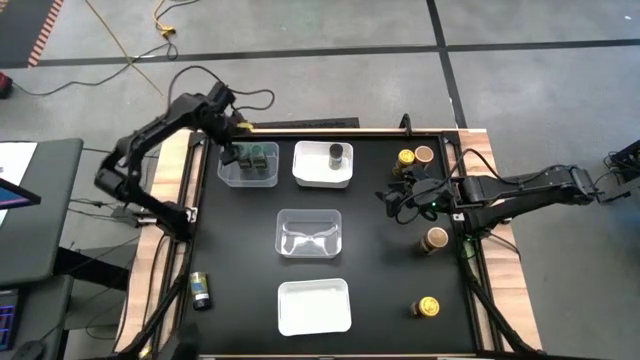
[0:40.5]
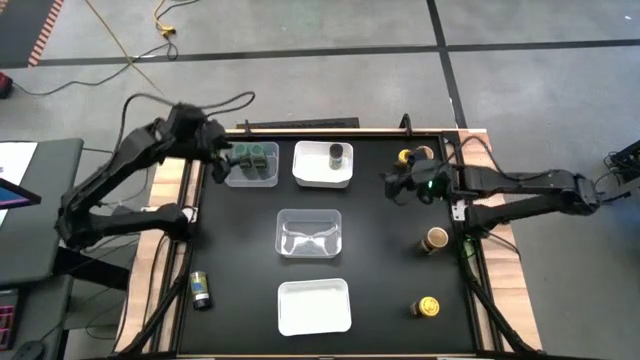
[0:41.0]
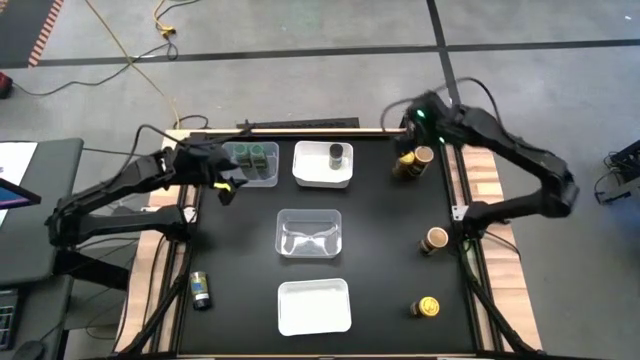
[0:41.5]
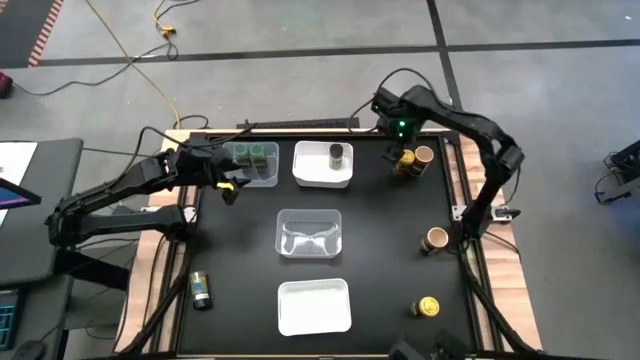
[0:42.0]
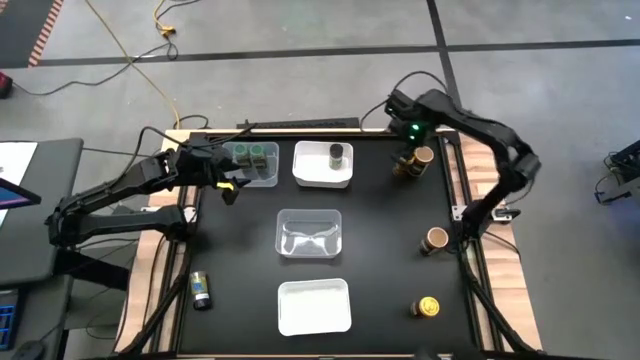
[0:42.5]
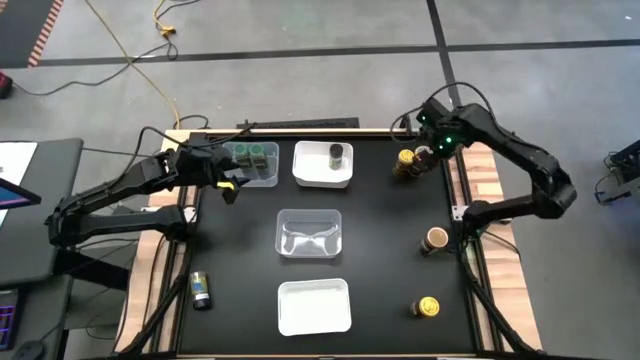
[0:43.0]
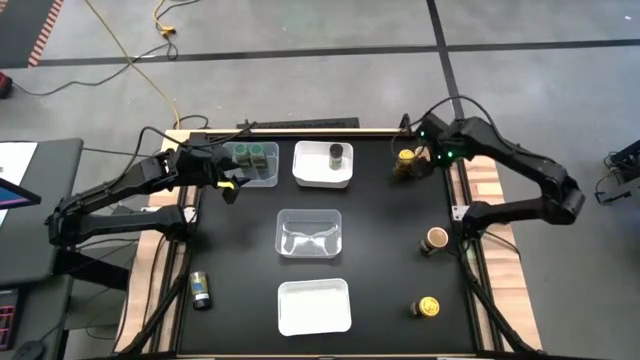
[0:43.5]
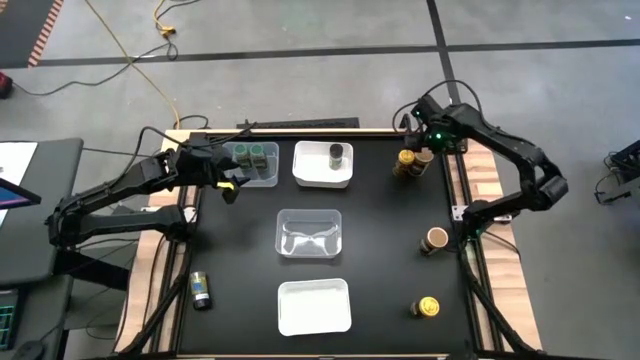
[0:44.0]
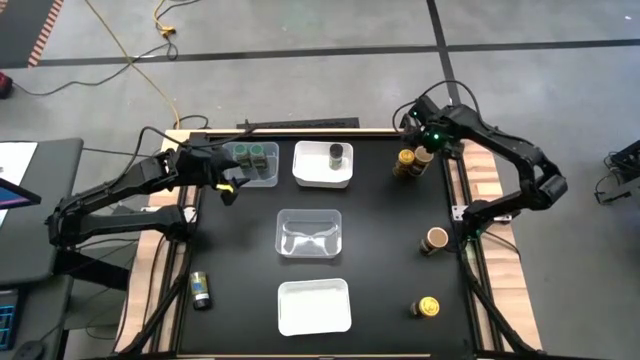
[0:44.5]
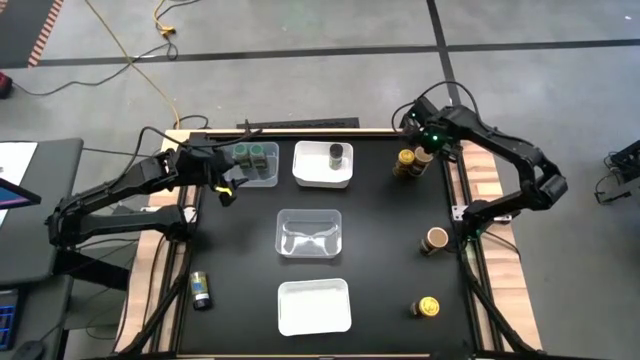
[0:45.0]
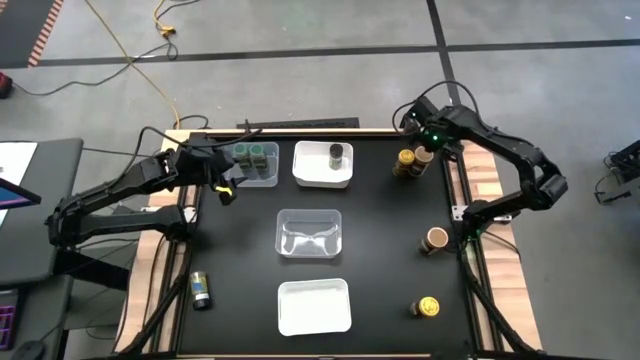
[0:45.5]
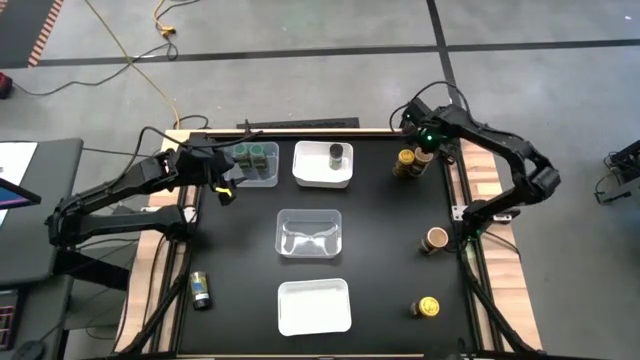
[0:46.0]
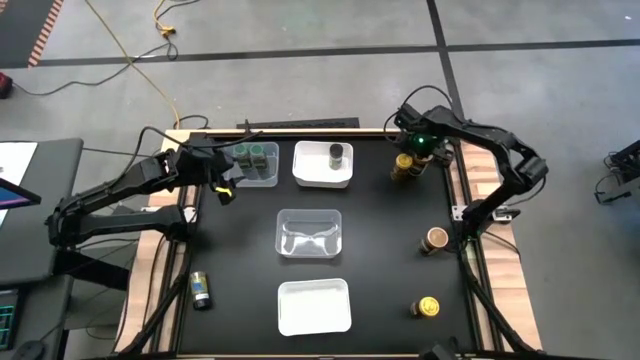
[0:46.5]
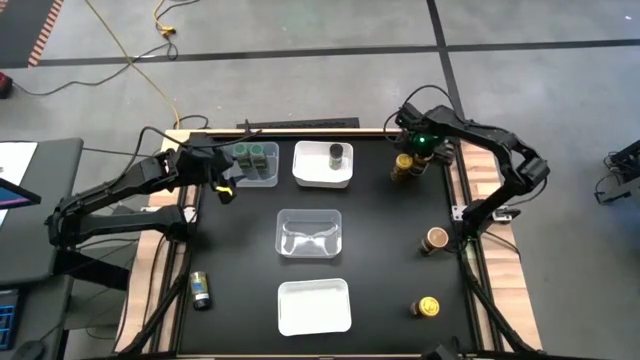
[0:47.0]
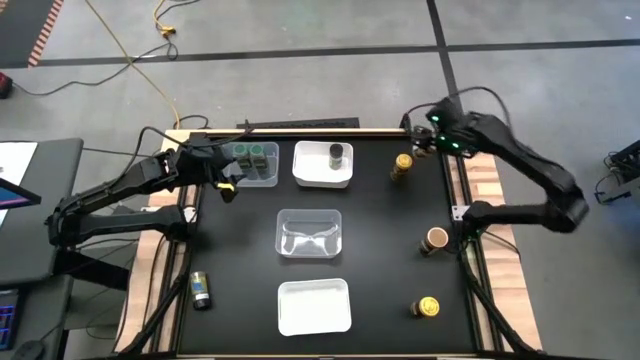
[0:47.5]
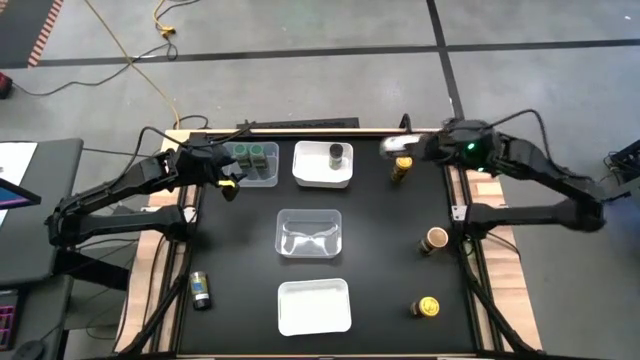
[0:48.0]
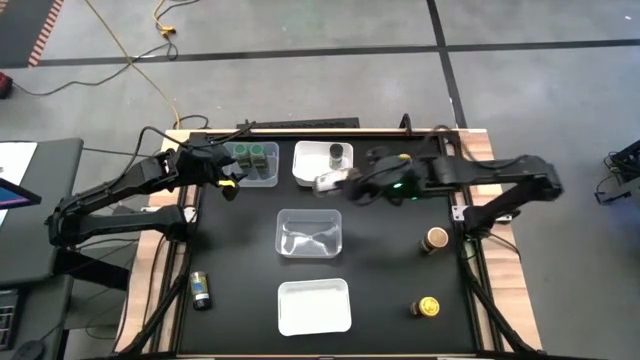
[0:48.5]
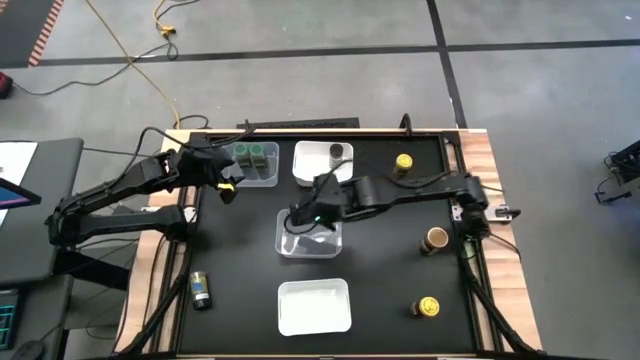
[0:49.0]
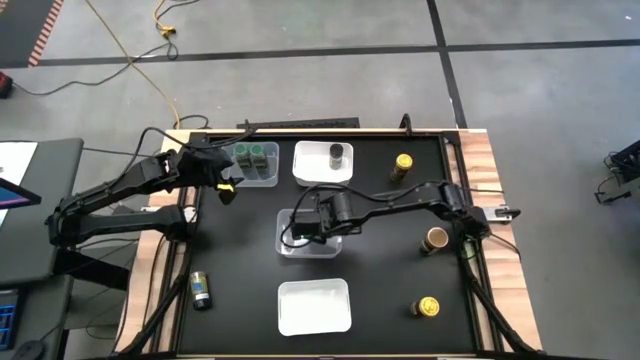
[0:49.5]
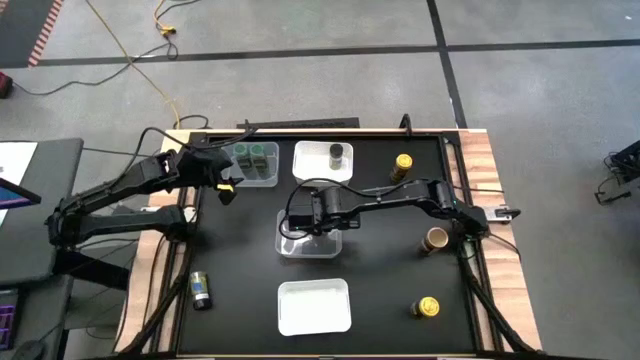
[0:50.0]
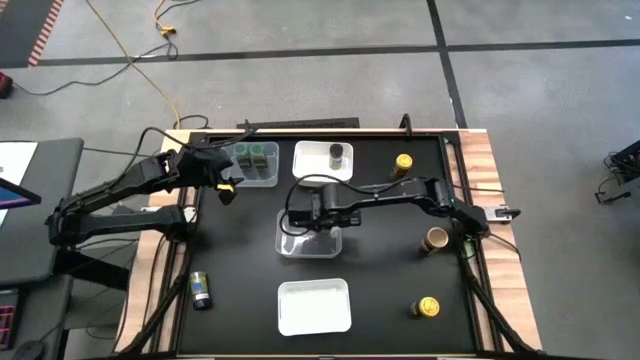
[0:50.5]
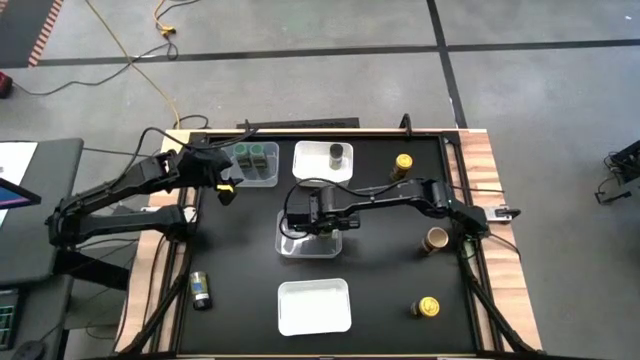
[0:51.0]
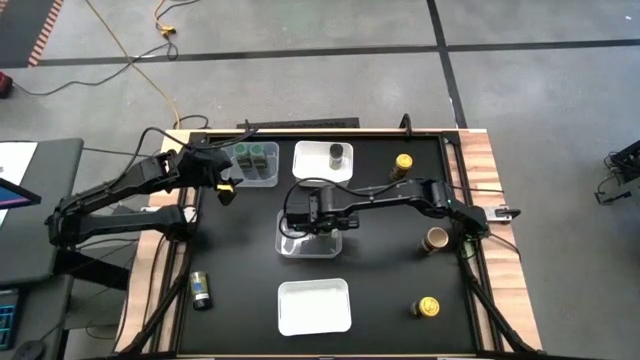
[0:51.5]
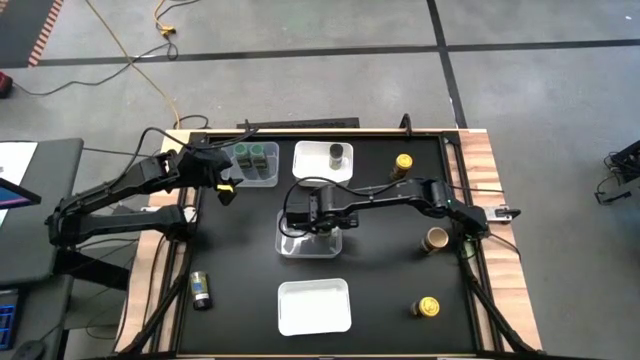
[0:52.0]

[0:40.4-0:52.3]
Task: Sort spices by type
Put the top brown seasoning bottle into the bottom transparent bin

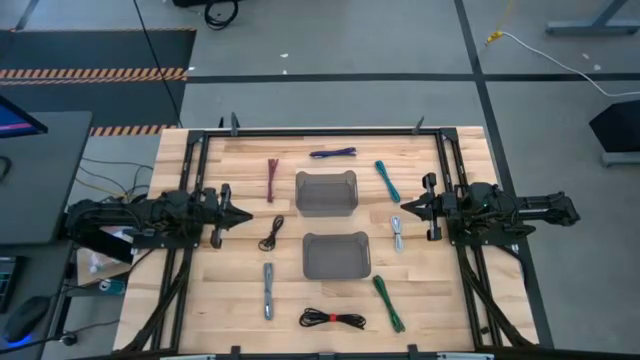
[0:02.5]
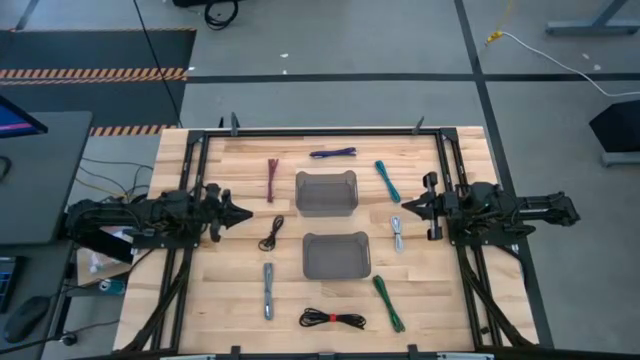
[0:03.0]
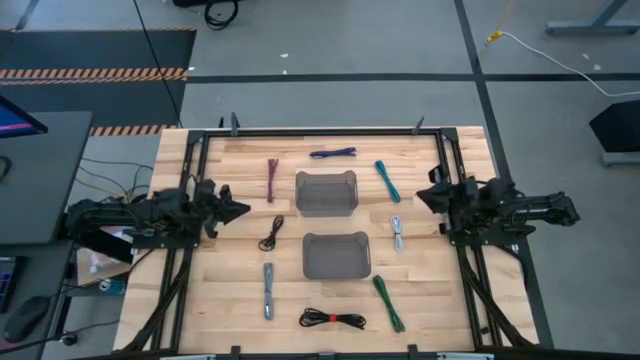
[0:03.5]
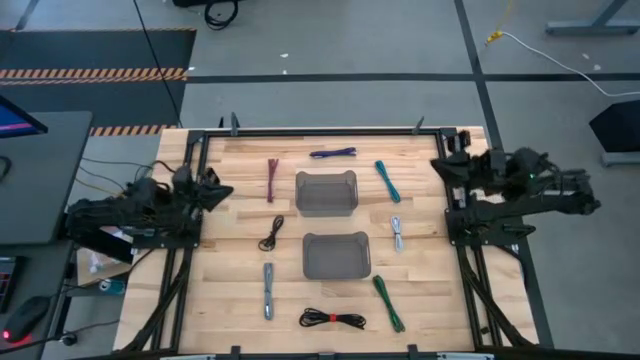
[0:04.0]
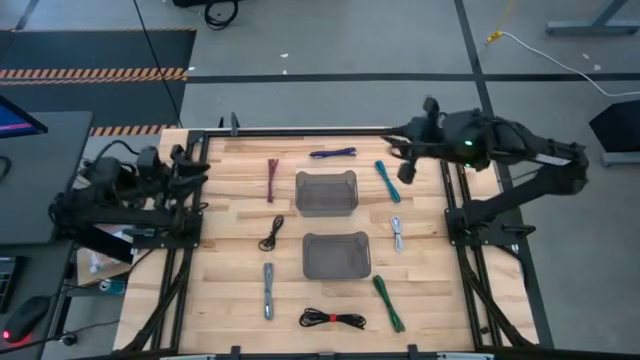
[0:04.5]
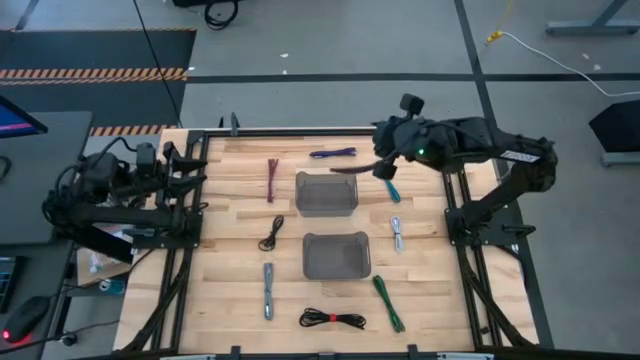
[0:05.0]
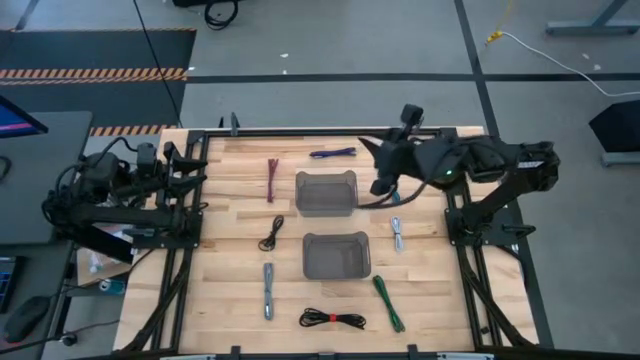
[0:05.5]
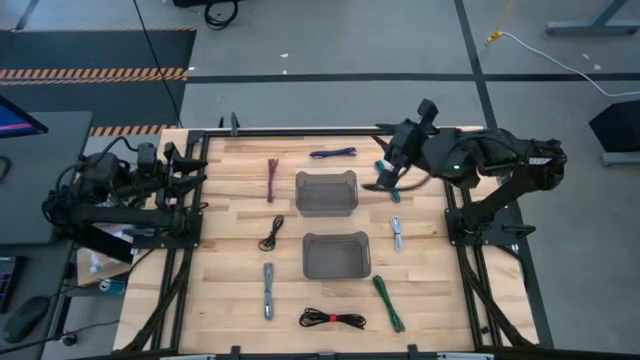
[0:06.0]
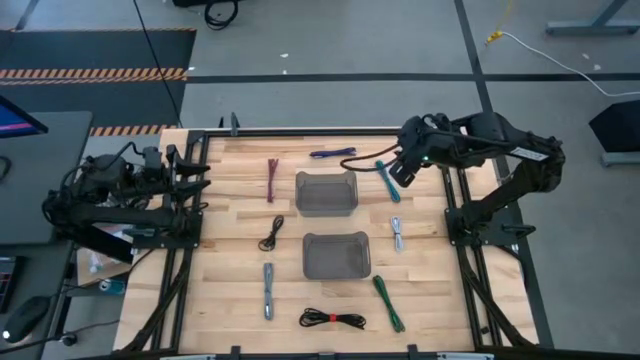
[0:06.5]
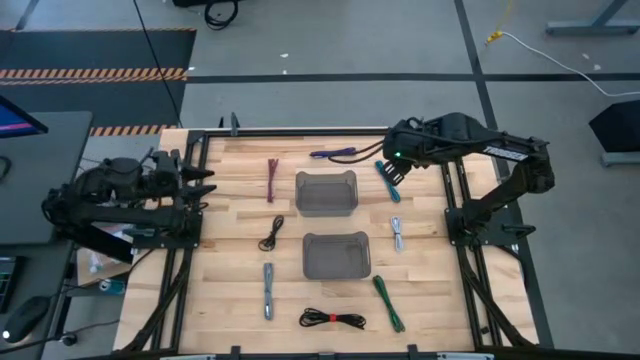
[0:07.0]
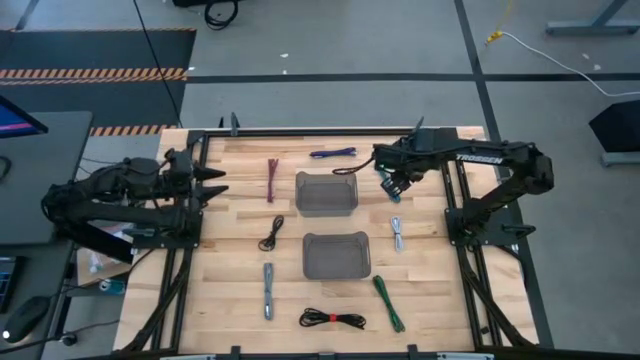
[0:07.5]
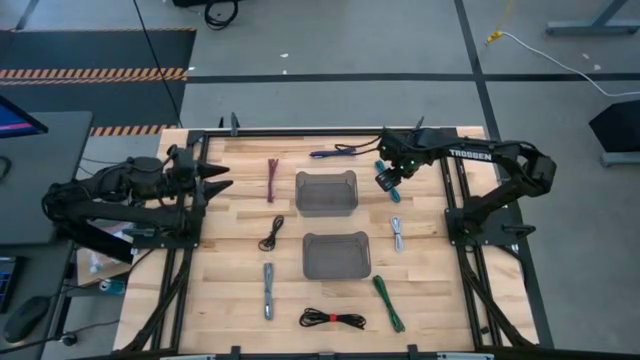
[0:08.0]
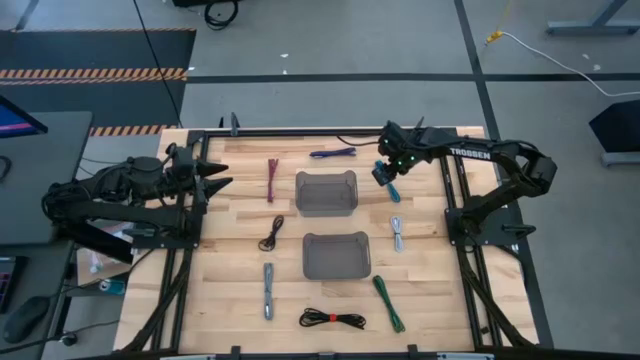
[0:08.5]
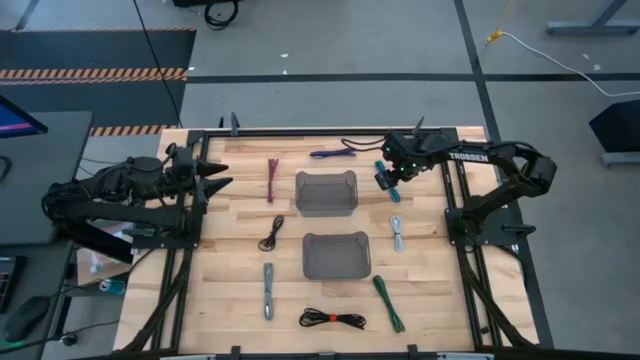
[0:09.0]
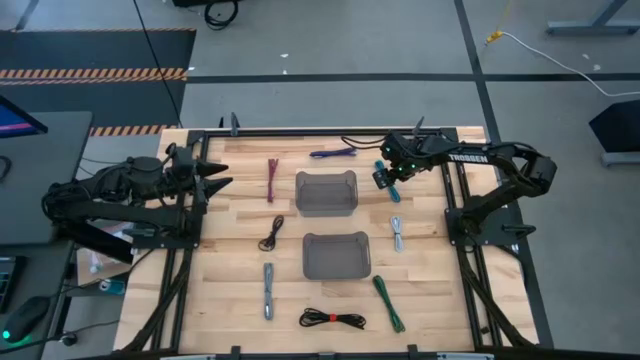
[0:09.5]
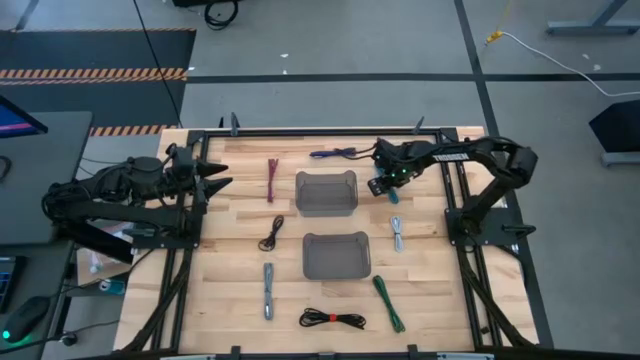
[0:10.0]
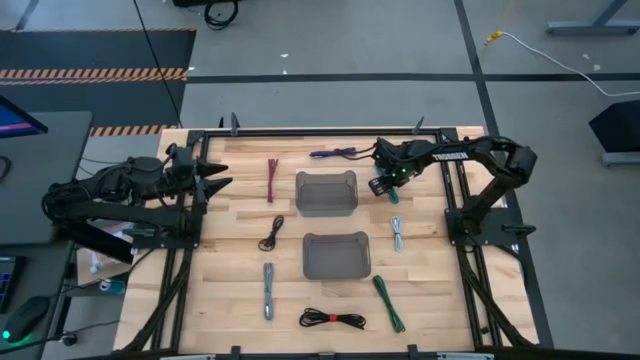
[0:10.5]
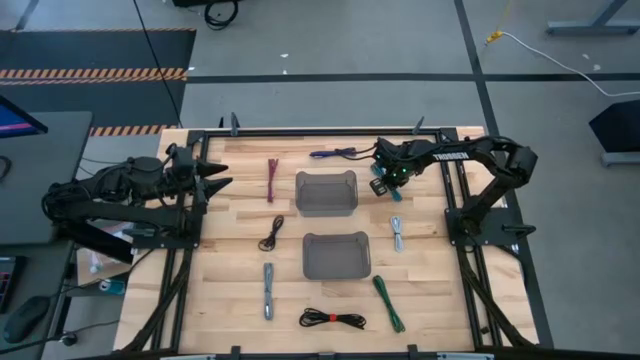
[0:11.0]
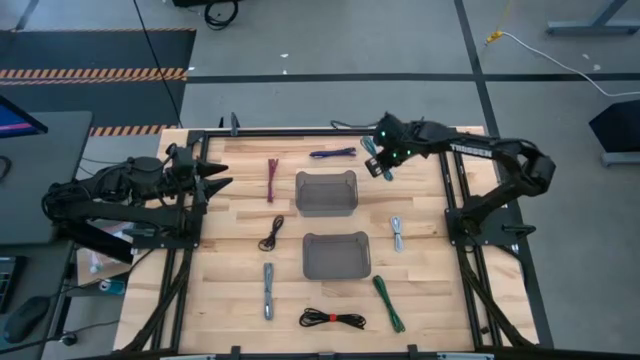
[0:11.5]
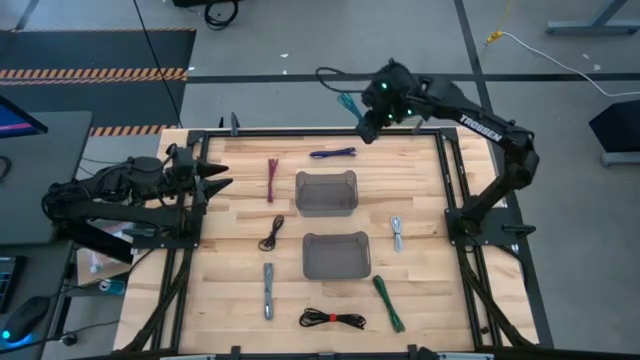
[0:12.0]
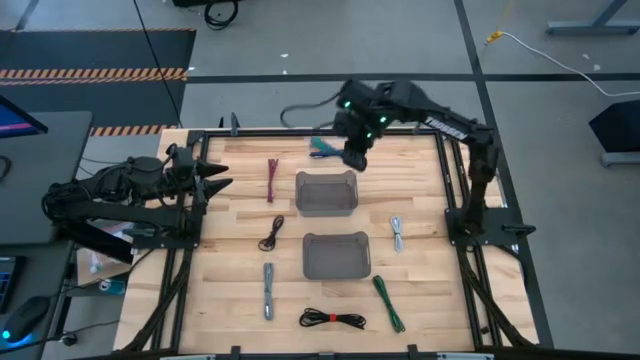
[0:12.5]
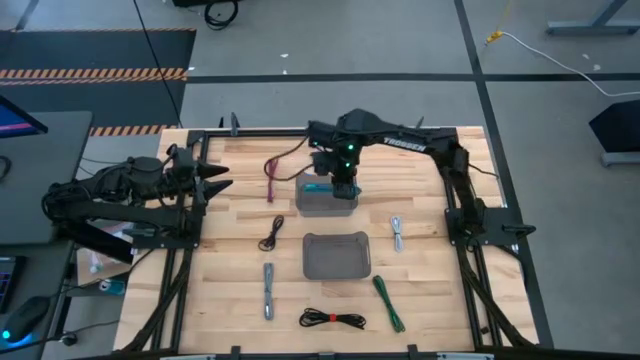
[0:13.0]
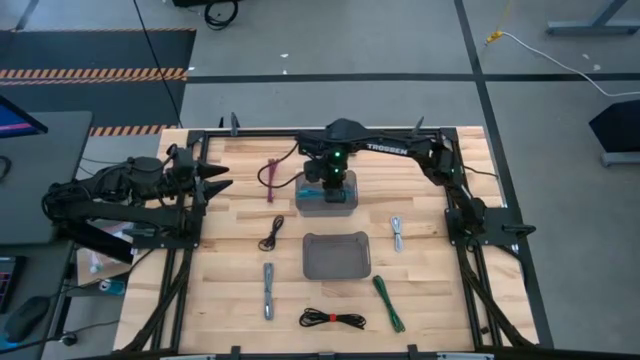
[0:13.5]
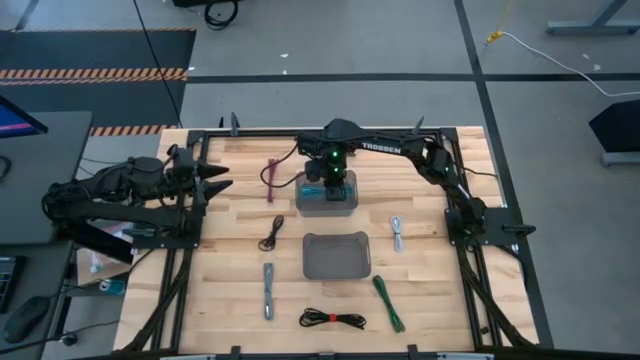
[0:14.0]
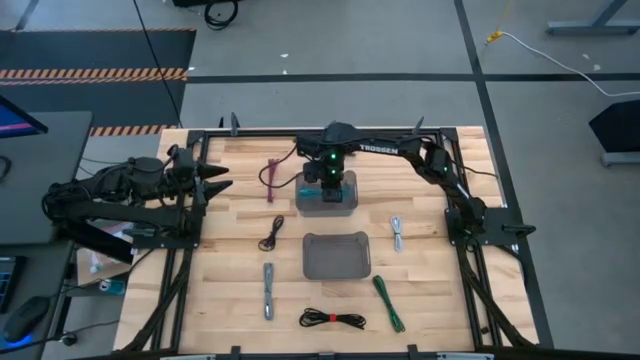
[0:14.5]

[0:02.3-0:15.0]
Task: Pick and place USB-C Cables
Put the blue charger cable into the top black transparent bin
